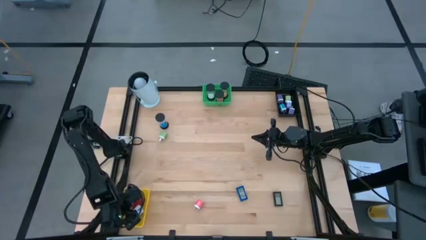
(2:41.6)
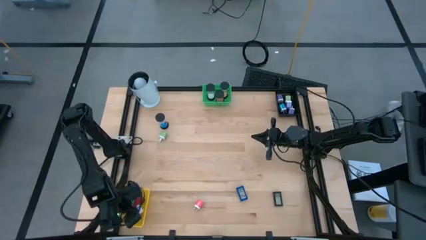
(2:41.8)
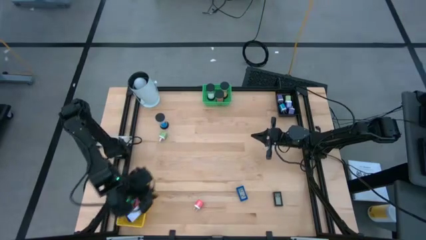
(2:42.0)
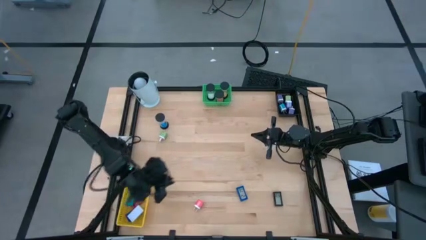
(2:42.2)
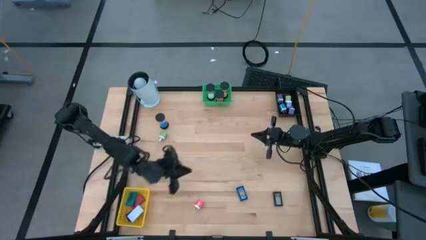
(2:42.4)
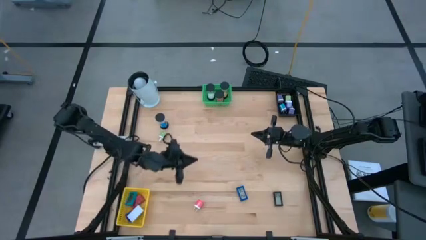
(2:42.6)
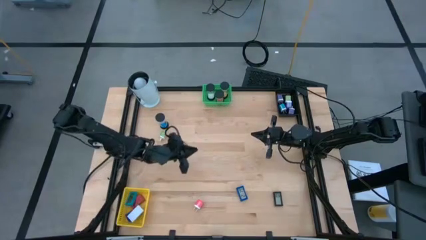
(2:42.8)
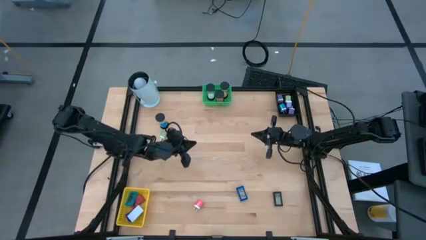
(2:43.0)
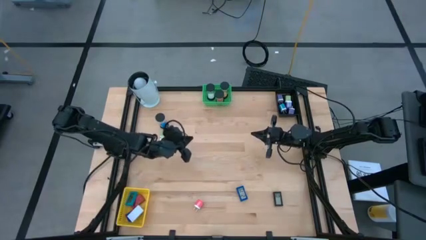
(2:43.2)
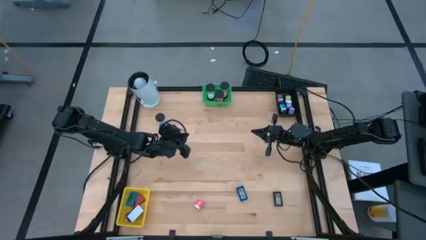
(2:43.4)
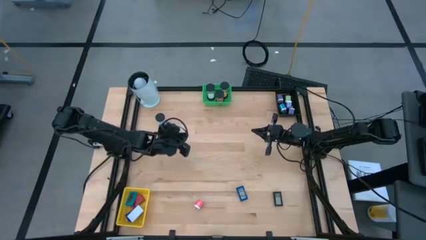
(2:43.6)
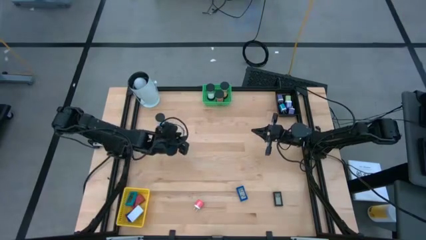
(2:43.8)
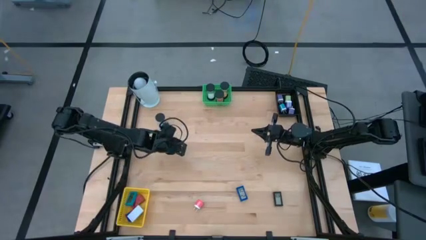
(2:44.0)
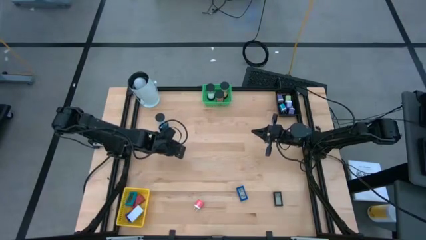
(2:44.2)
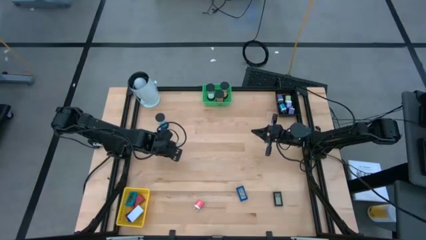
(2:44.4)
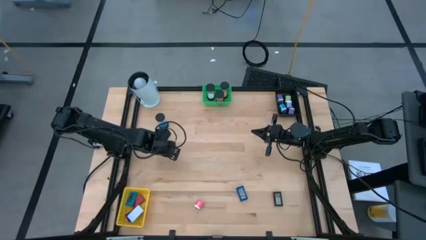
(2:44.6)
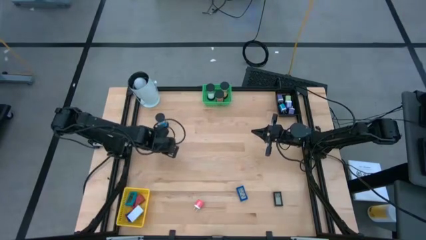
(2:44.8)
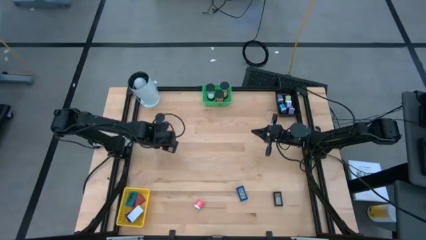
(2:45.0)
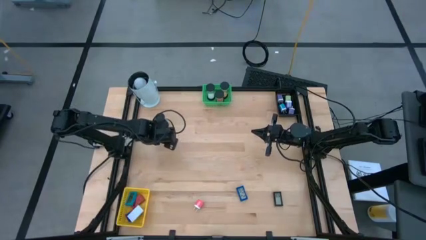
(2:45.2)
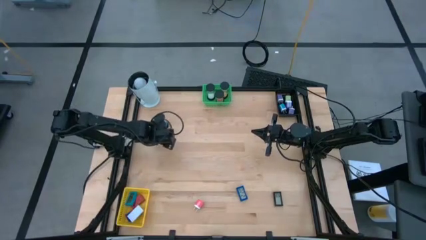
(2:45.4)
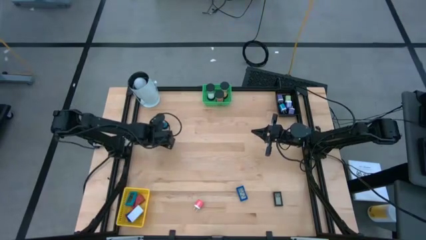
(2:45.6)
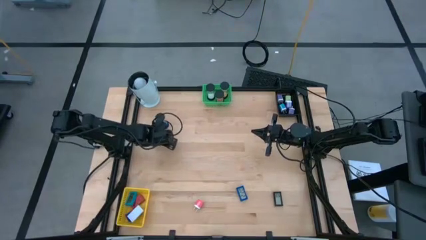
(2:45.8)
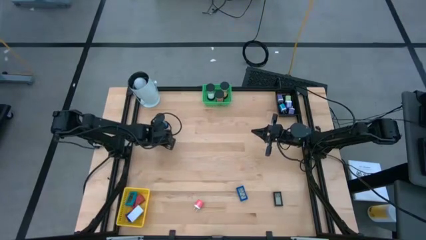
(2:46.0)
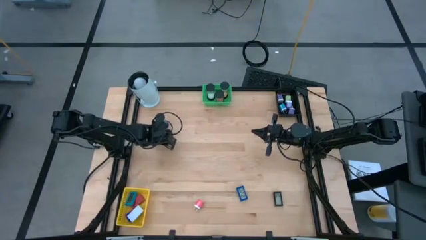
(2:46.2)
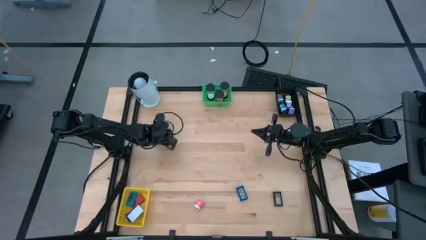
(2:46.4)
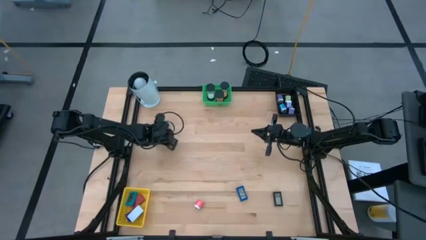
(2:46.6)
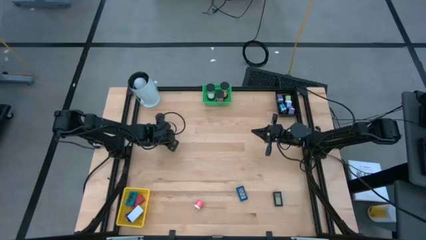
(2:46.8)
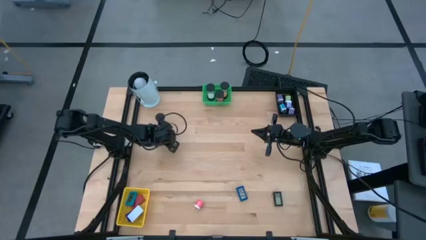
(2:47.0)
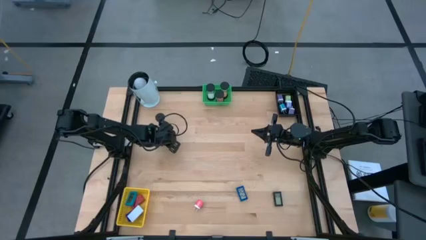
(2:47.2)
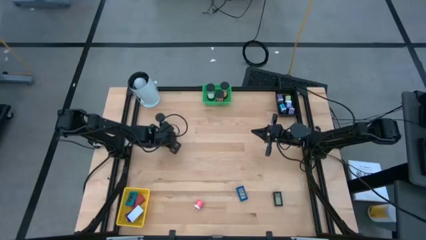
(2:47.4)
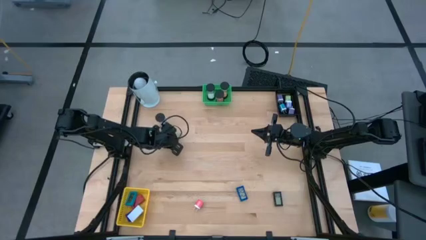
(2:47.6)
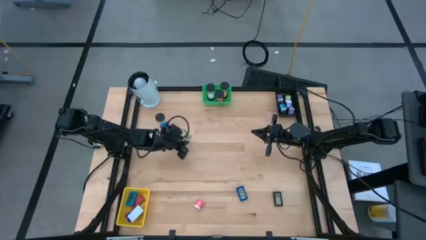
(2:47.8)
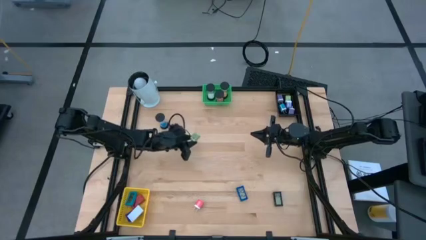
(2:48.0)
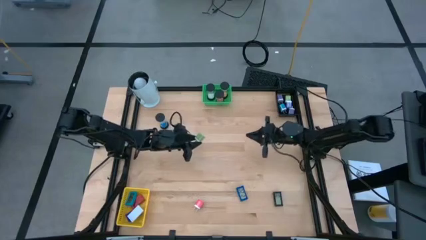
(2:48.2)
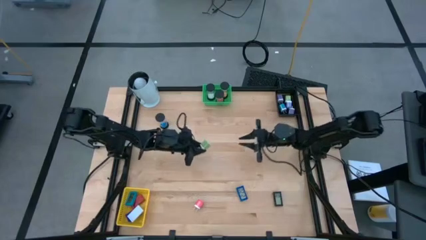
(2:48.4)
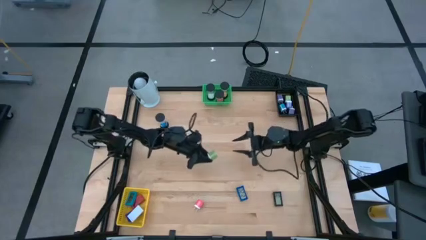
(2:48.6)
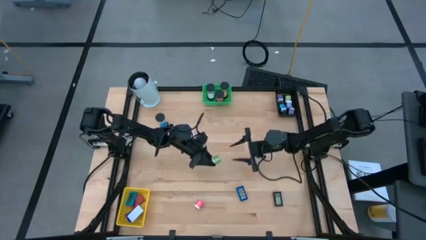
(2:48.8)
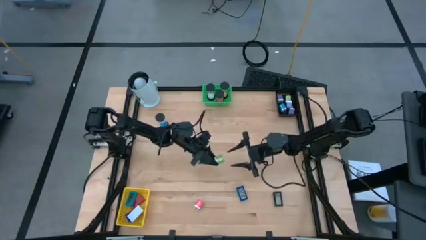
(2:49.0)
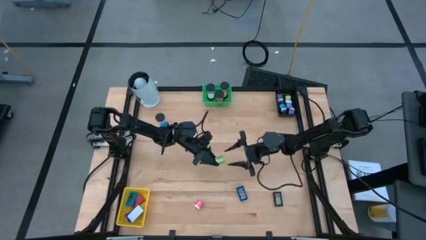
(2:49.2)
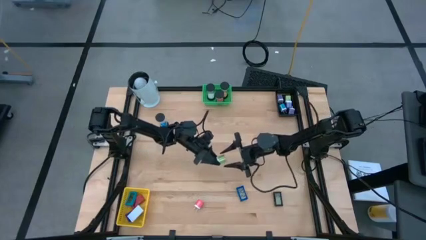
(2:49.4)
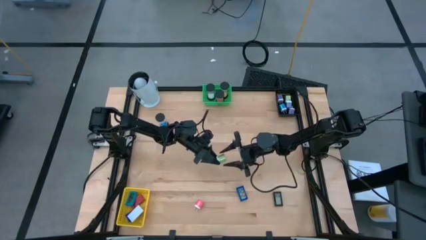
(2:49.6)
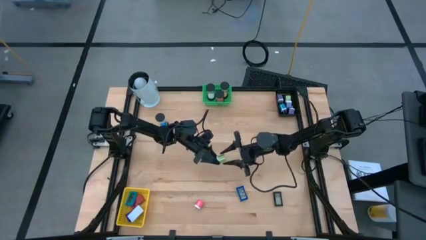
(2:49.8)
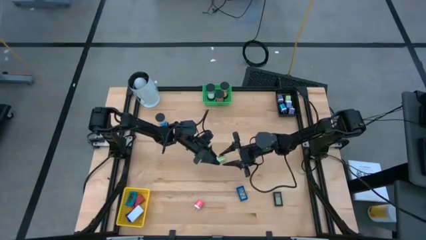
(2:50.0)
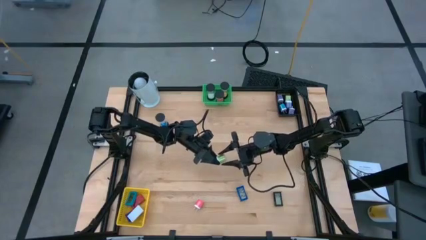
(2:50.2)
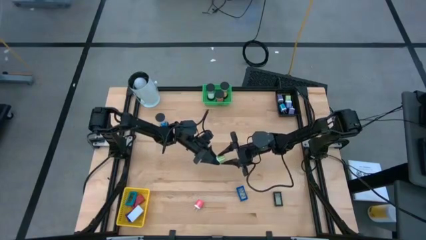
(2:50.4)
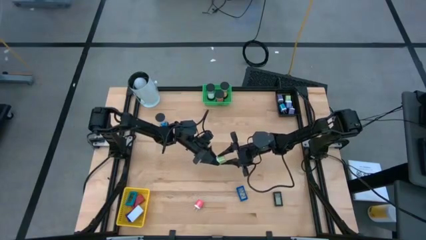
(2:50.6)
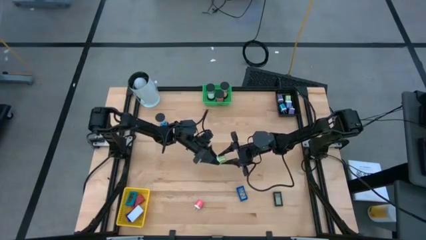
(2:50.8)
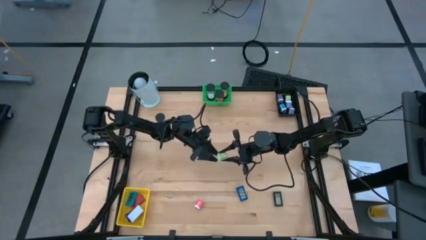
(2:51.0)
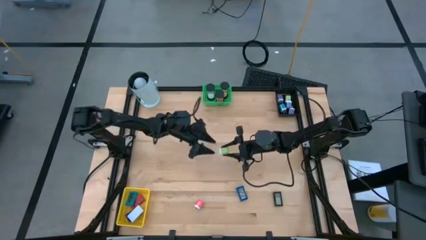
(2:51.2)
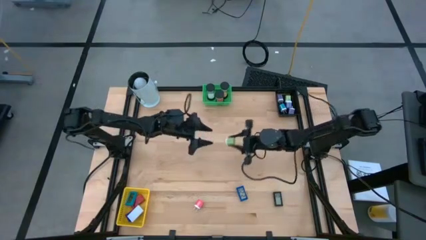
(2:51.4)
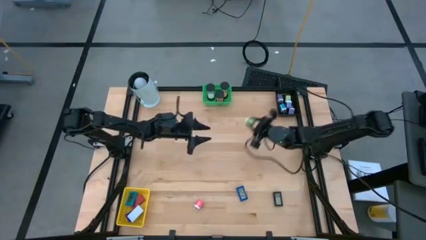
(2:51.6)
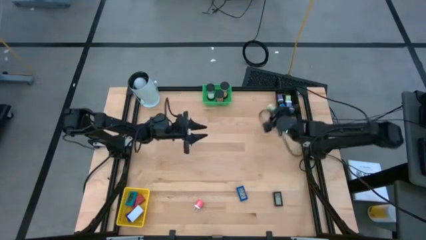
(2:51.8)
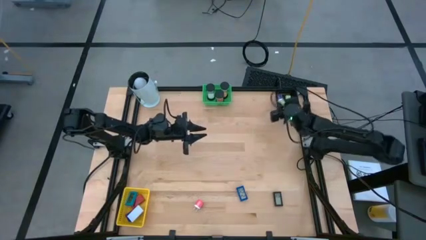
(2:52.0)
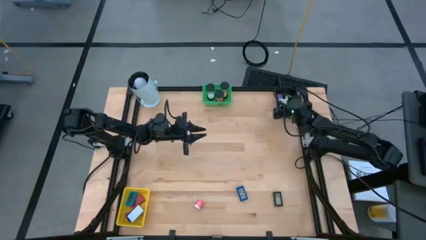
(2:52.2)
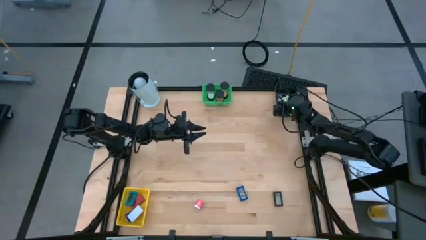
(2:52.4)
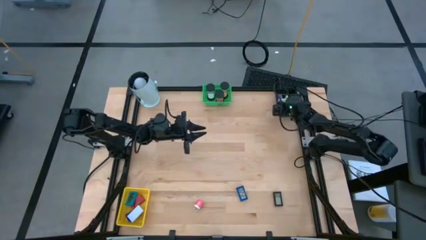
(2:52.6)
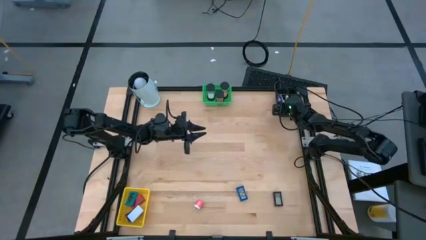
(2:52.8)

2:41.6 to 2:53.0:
Task: Pick & Place Office items
Put the green adapter into the black basket

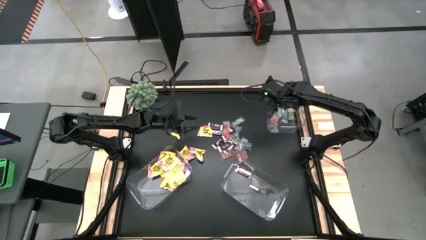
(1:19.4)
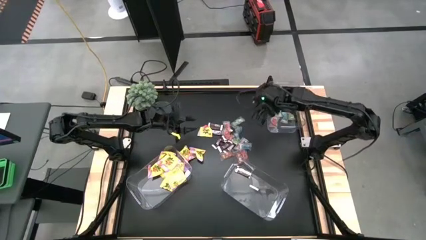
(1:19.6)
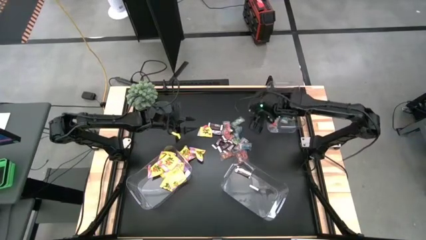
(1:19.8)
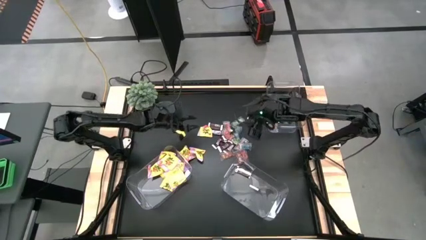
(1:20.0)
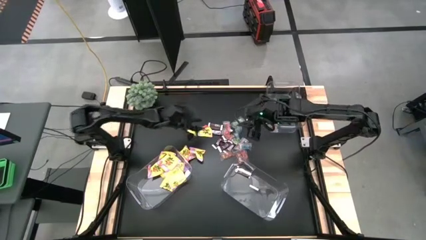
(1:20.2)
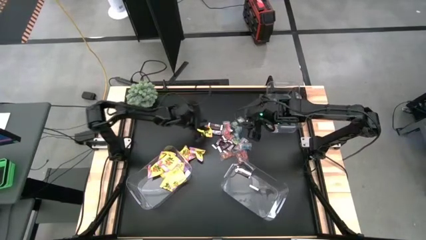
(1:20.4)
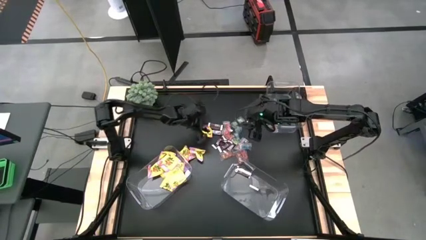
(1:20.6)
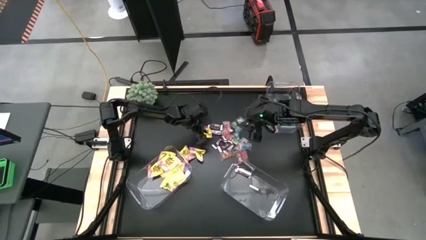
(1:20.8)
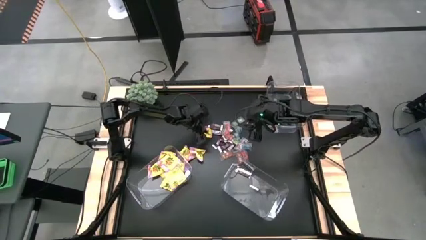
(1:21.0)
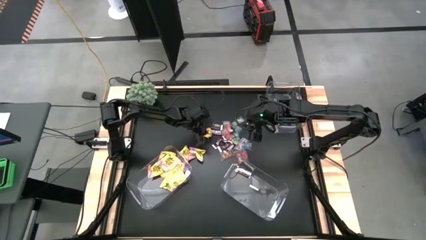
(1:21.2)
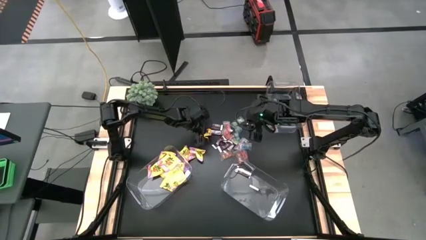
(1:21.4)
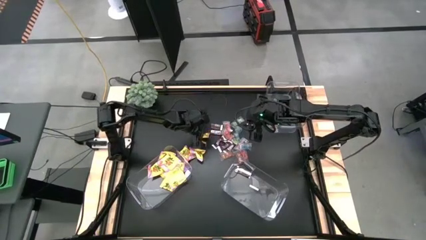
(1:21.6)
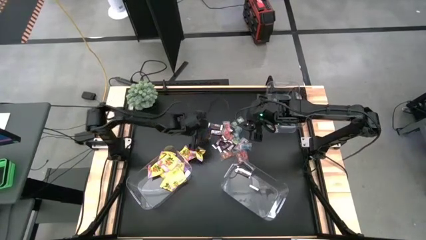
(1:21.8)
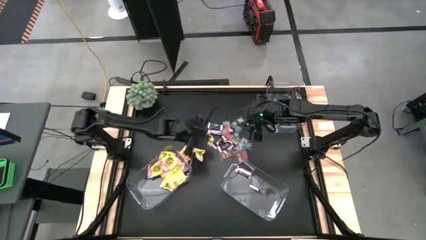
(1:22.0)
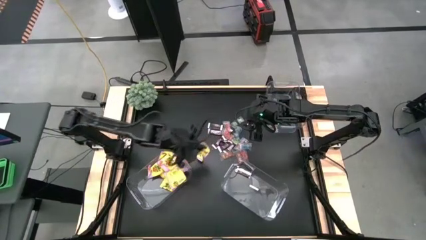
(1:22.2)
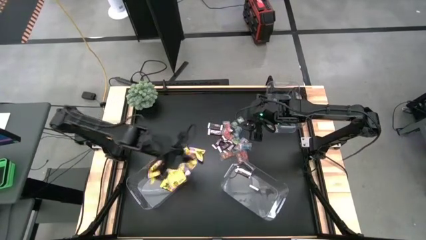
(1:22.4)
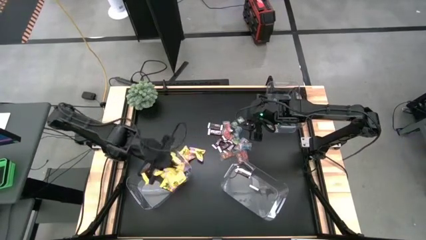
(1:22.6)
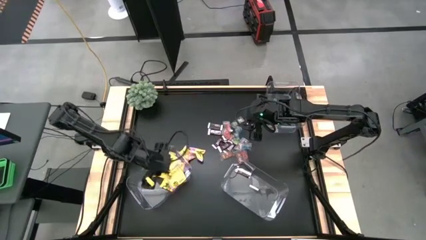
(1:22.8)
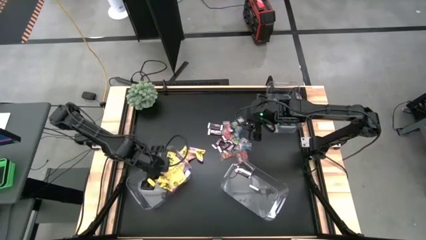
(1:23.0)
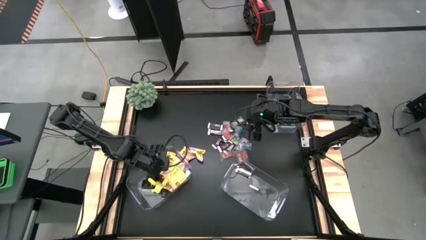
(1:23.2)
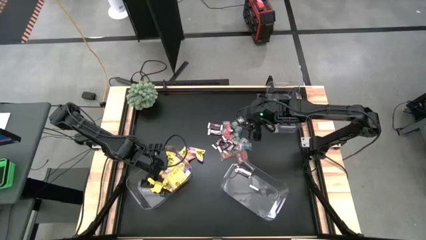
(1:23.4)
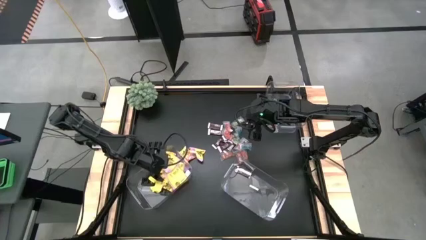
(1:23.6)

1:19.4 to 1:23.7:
Task: Sort candy
Put the yellow candy in the bottom left transparent container
